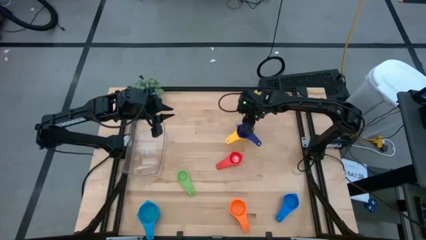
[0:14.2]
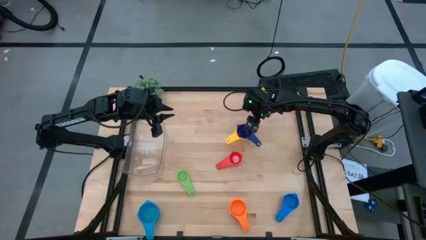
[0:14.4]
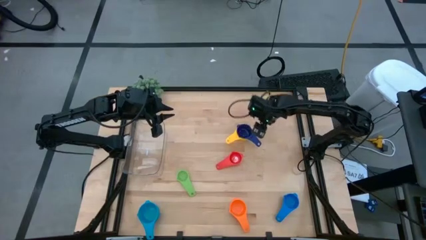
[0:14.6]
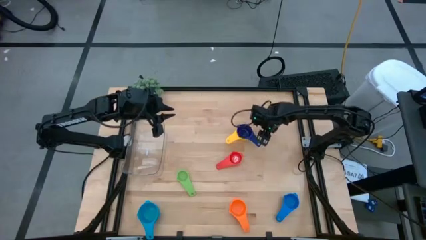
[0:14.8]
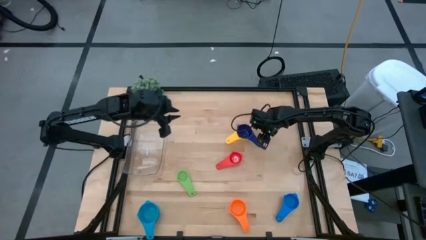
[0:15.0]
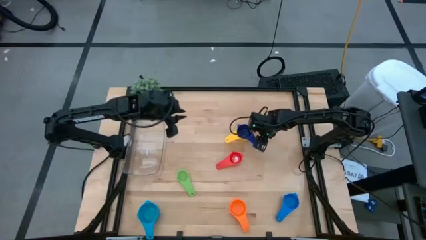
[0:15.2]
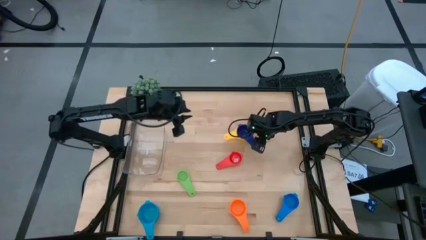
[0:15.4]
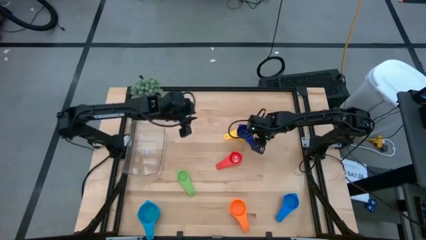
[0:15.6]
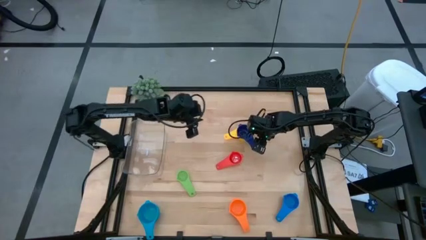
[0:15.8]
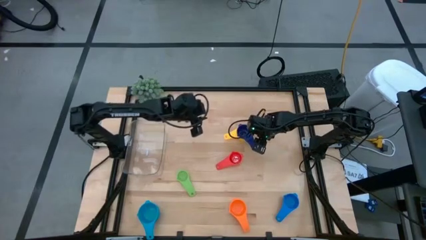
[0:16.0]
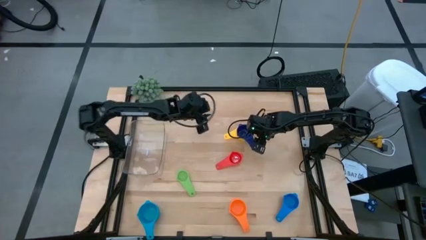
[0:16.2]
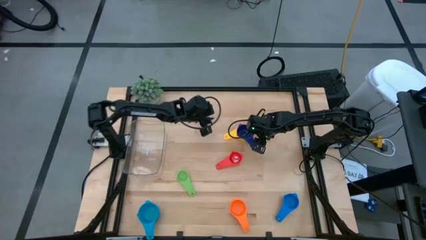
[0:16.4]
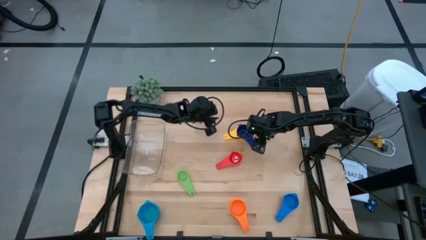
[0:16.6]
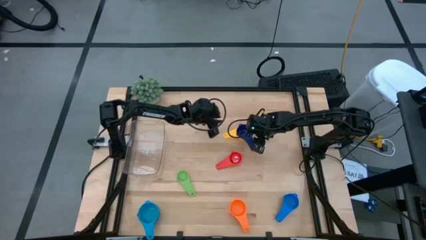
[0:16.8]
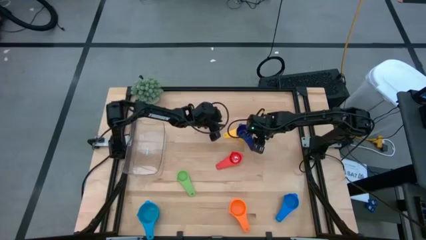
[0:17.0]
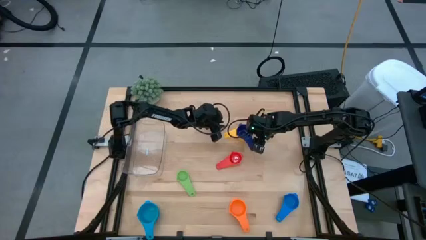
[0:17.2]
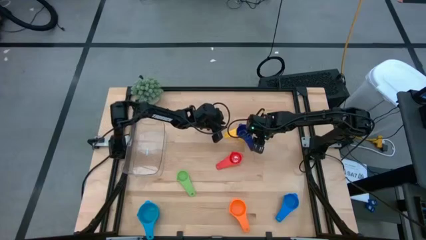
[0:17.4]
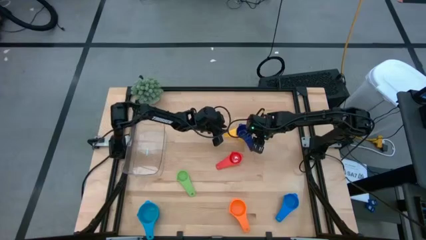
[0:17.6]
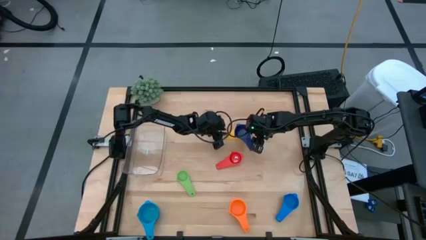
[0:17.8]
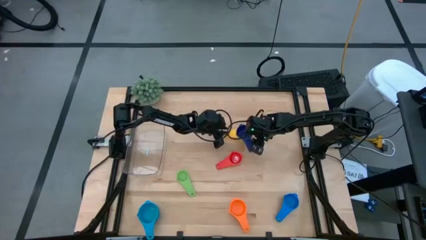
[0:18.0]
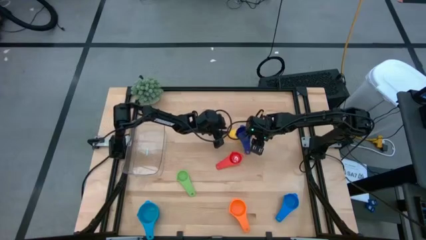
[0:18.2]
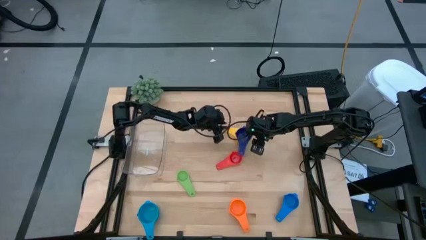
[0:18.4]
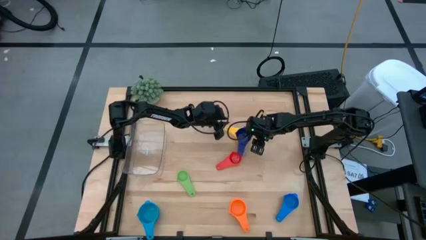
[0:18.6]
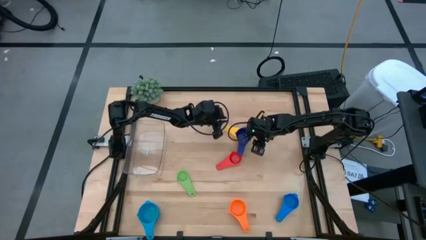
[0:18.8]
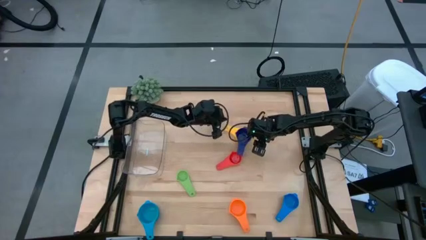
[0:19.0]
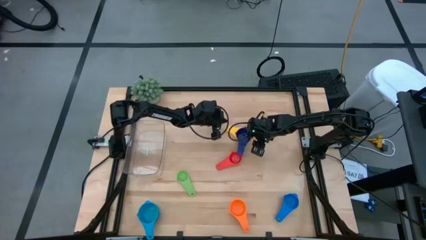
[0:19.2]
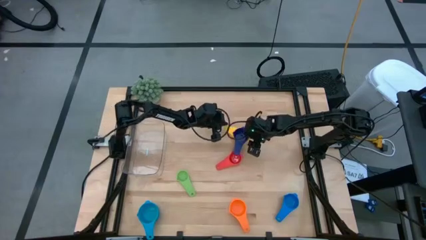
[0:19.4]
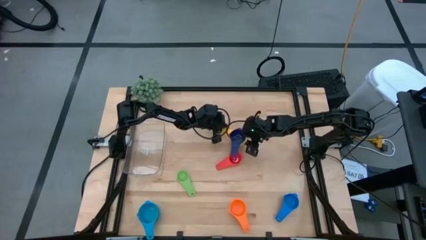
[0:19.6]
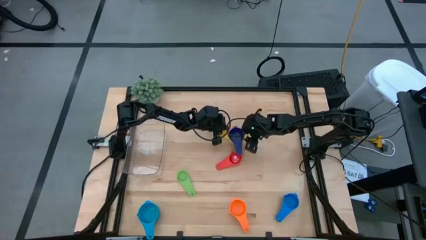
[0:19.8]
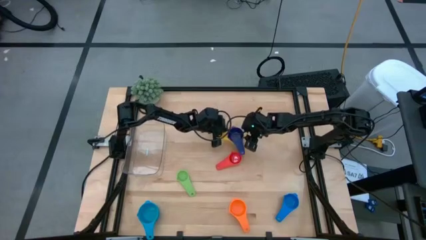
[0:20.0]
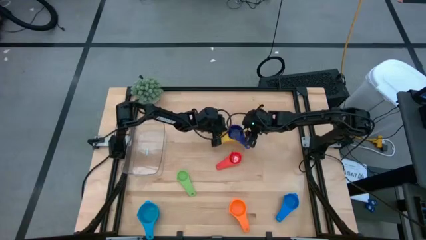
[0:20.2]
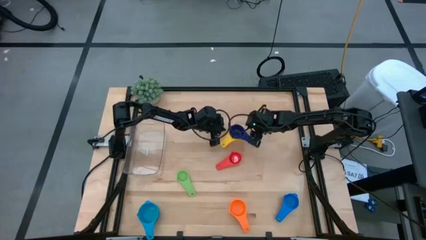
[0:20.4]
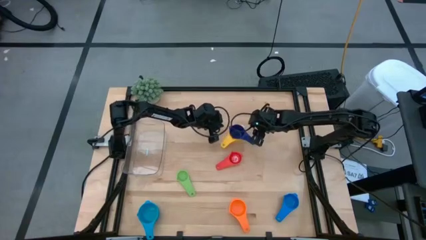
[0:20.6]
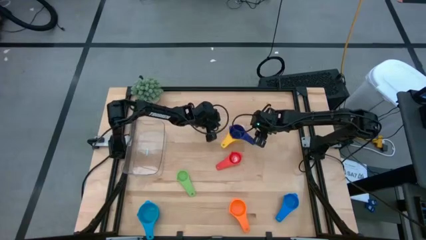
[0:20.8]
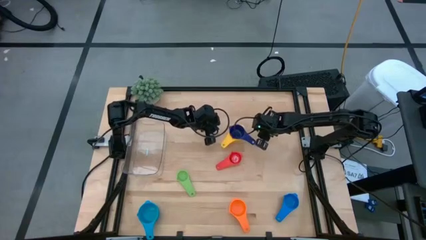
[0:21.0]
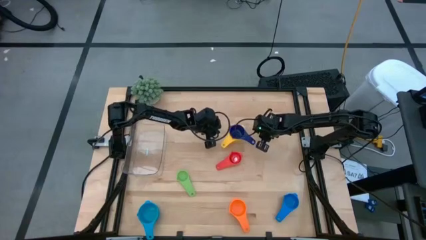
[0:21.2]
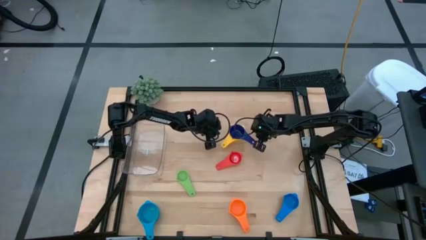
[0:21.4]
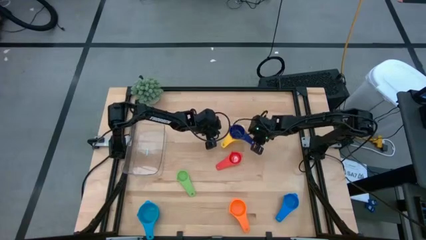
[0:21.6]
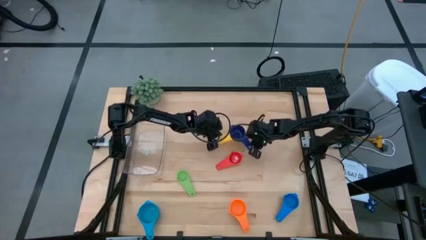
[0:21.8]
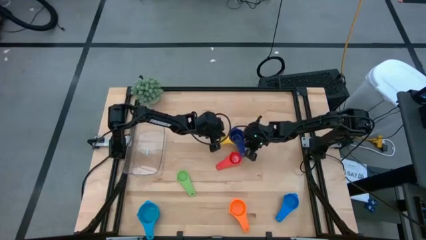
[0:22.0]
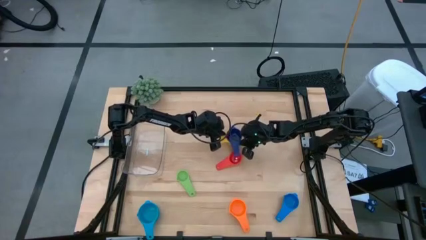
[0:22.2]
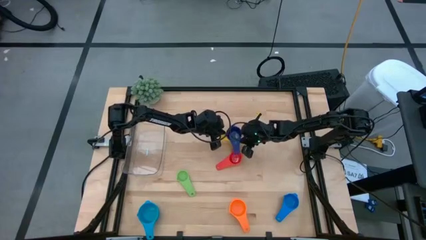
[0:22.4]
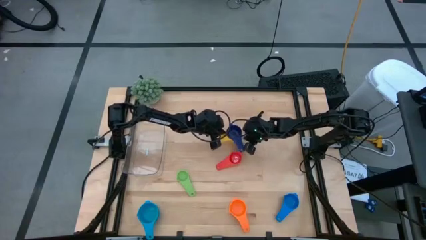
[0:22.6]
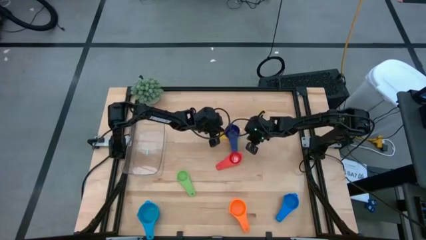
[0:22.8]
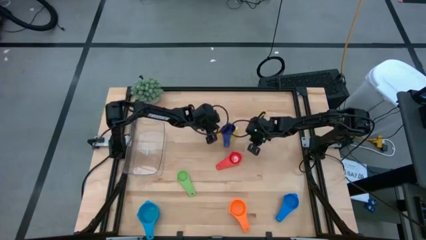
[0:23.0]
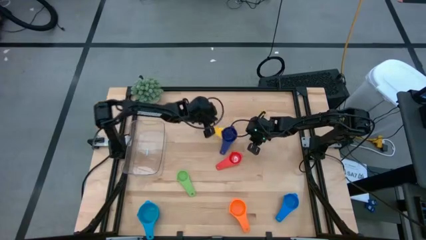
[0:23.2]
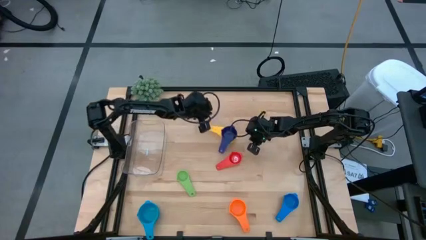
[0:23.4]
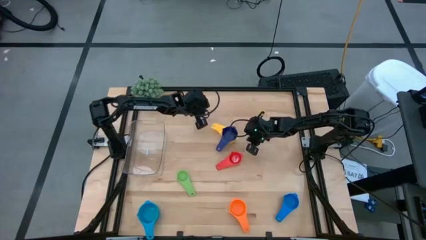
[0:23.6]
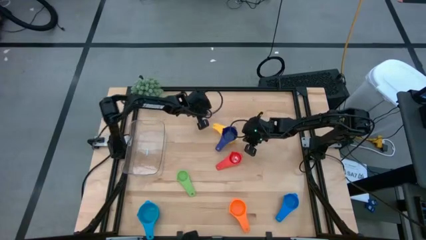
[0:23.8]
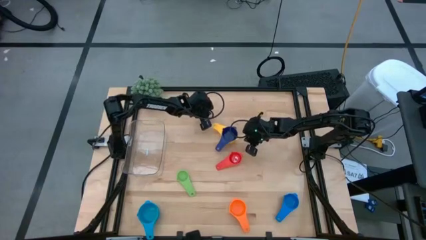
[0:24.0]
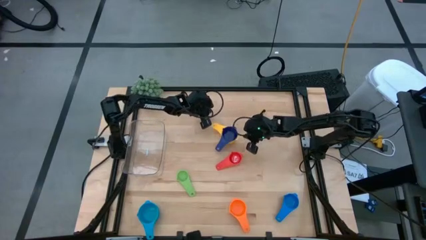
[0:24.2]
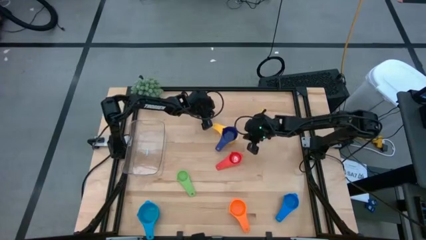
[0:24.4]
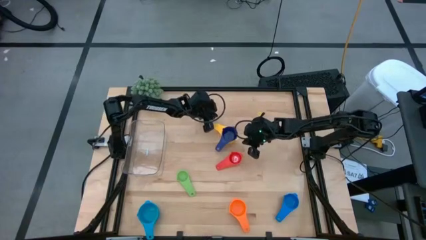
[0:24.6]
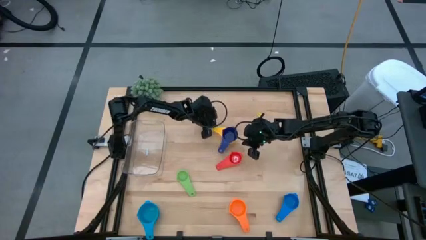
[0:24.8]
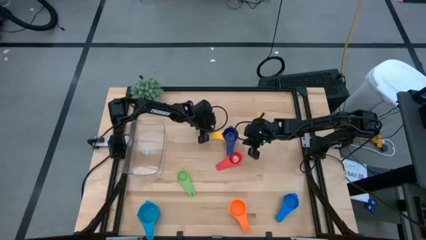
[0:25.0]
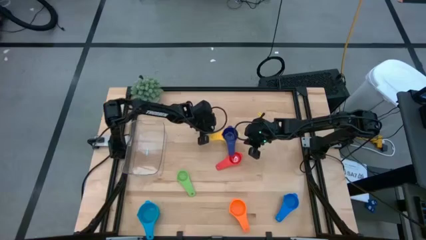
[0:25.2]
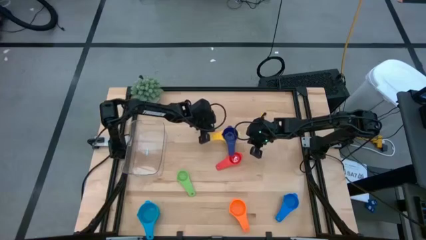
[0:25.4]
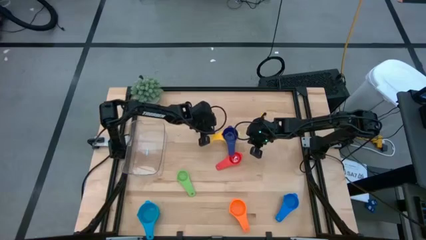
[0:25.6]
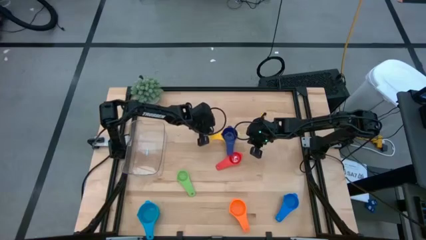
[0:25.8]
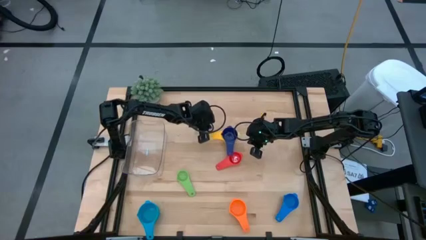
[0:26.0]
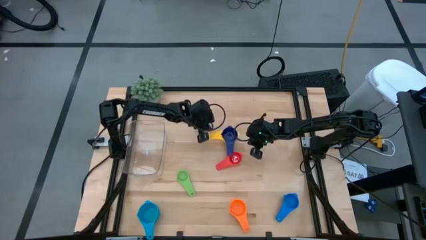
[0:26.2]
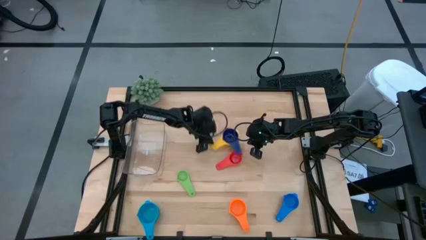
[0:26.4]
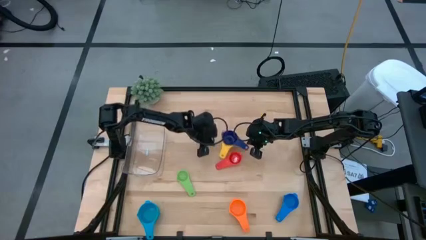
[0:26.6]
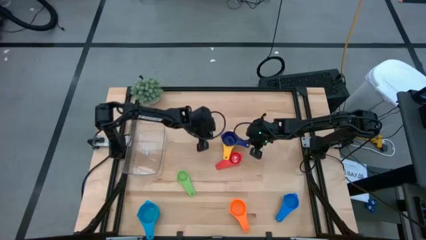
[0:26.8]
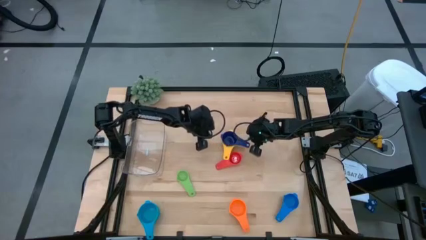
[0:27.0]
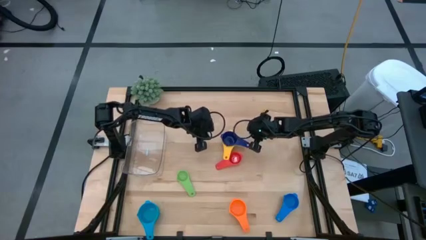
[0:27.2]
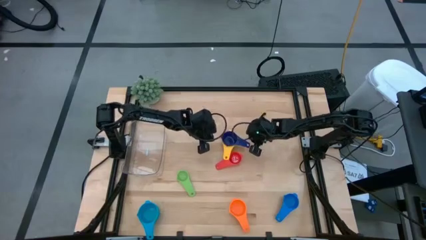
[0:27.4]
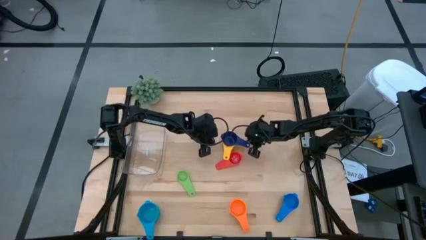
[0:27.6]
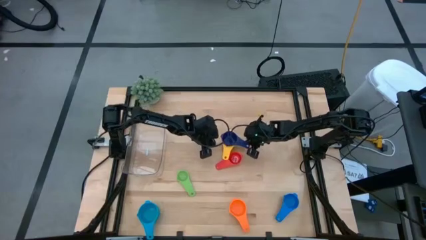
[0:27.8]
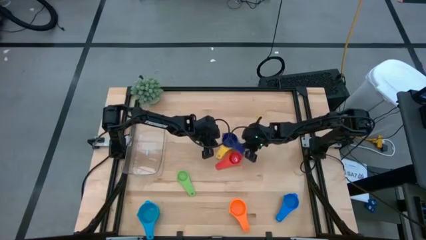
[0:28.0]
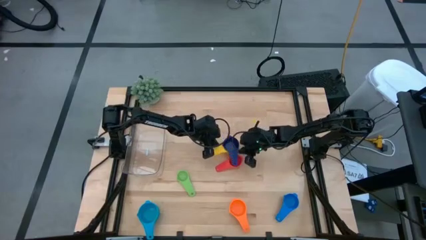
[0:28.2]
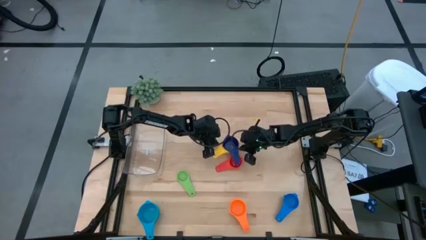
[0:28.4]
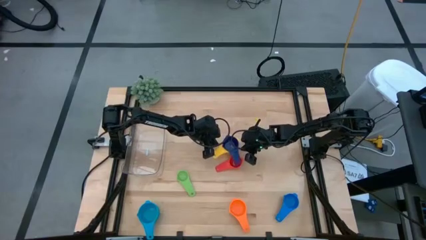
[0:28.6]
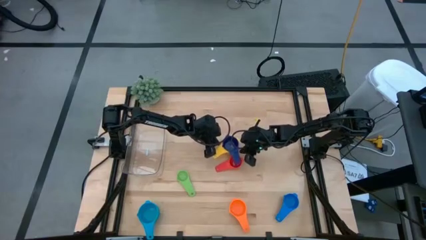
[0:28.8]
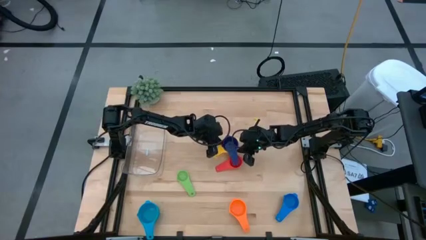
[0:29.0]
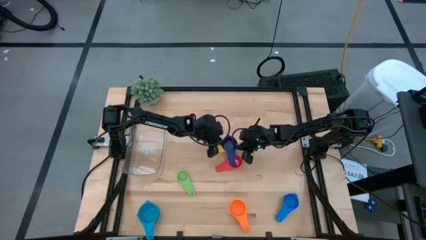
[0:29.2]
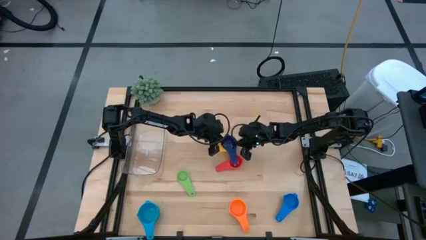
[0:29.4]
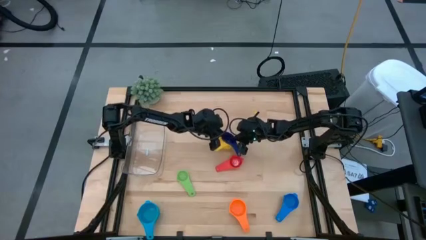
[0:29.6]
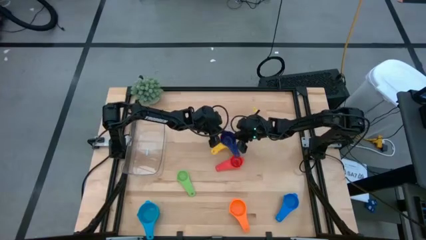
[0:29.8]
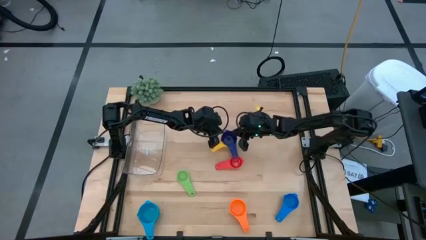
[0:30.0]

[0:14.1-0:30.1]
Task: Nest measuring cups in basket
Adjust the stacked measuring cup on the table
